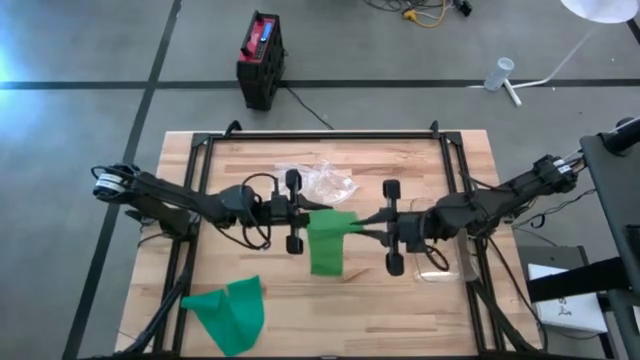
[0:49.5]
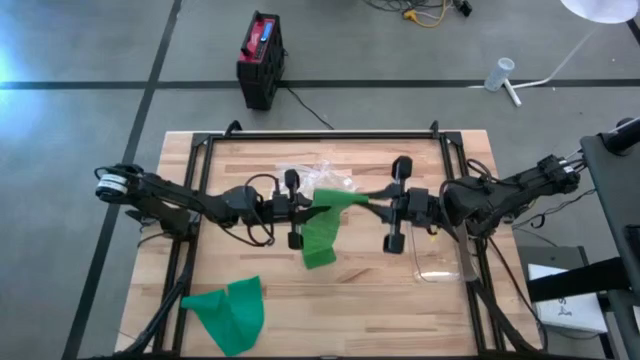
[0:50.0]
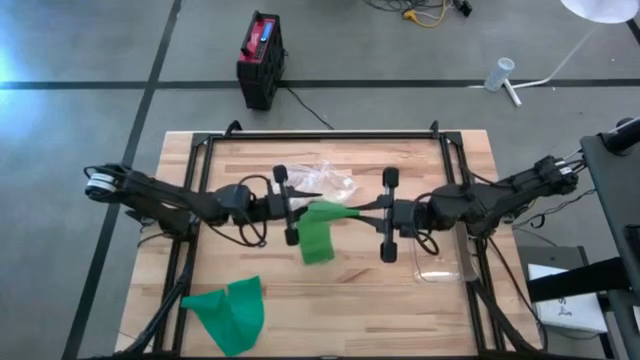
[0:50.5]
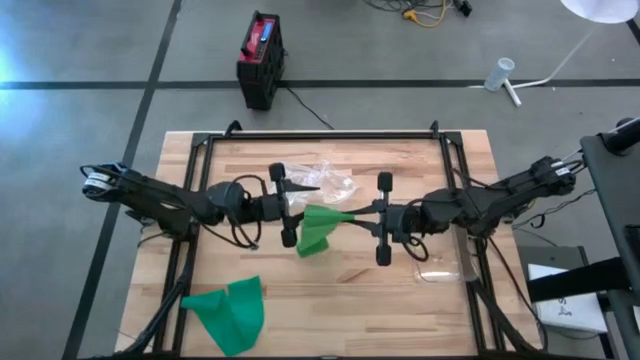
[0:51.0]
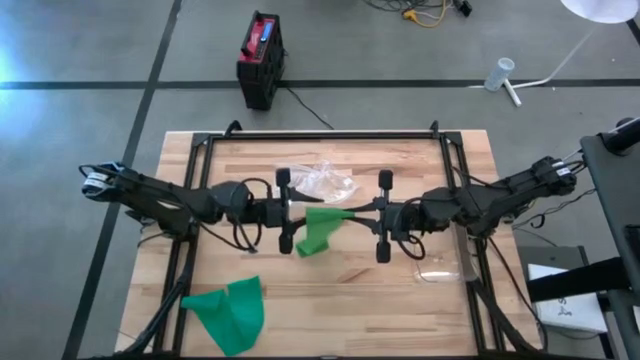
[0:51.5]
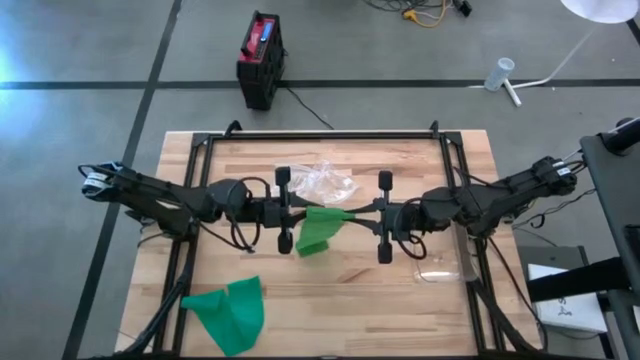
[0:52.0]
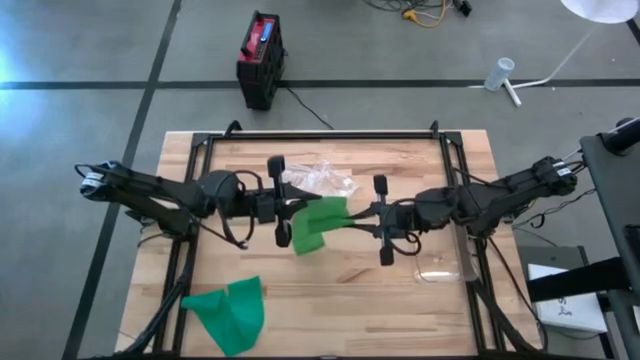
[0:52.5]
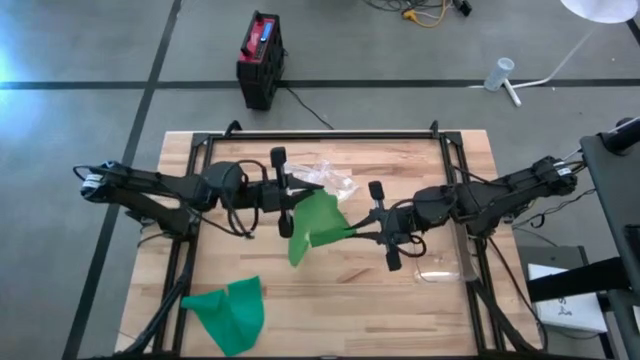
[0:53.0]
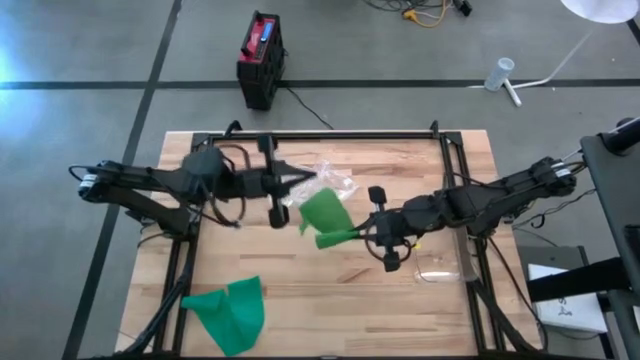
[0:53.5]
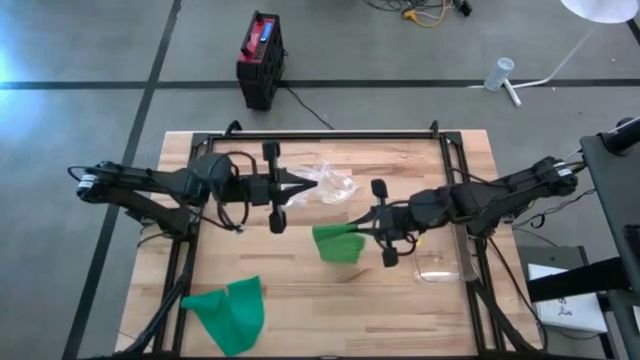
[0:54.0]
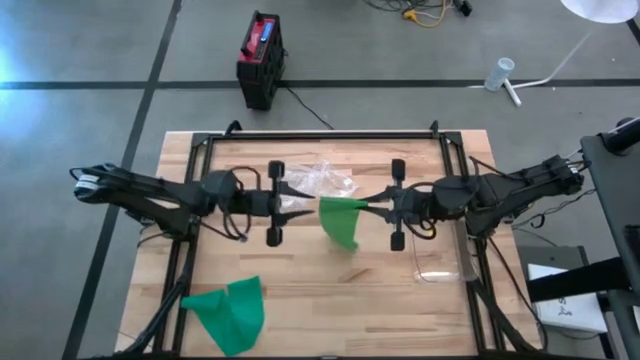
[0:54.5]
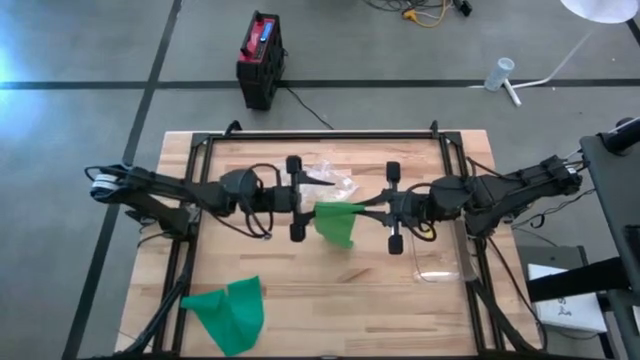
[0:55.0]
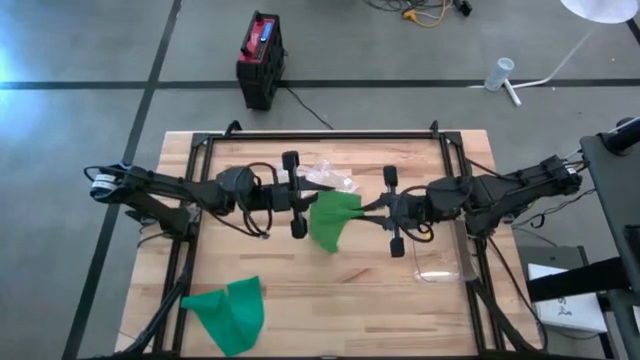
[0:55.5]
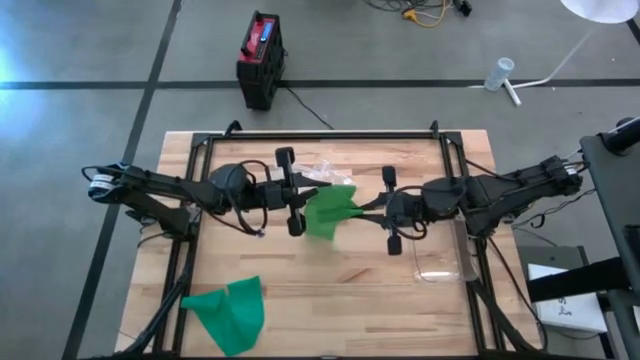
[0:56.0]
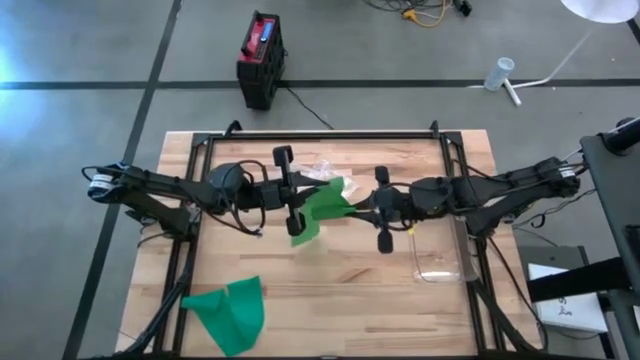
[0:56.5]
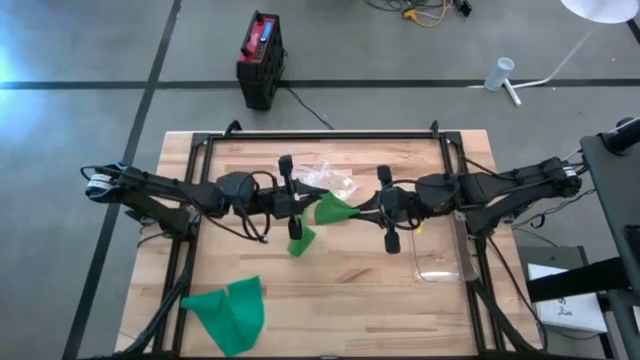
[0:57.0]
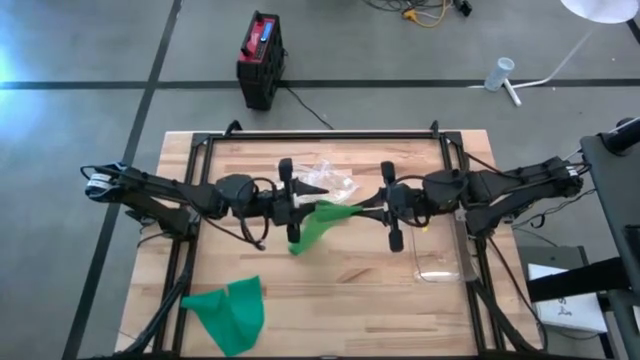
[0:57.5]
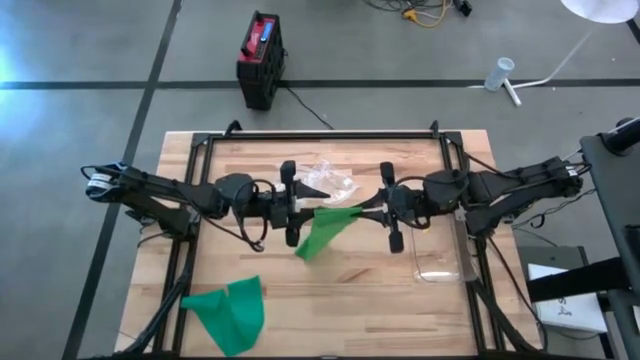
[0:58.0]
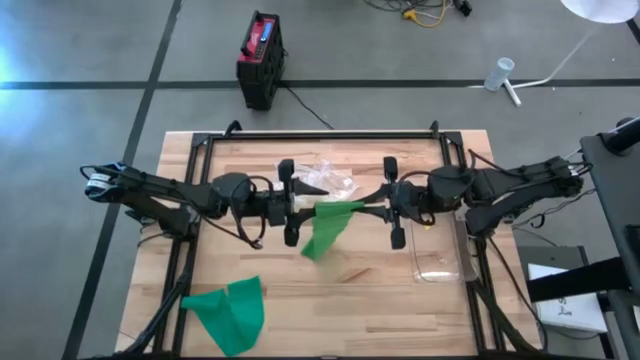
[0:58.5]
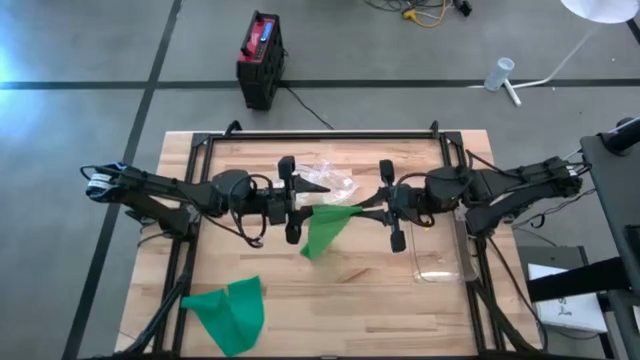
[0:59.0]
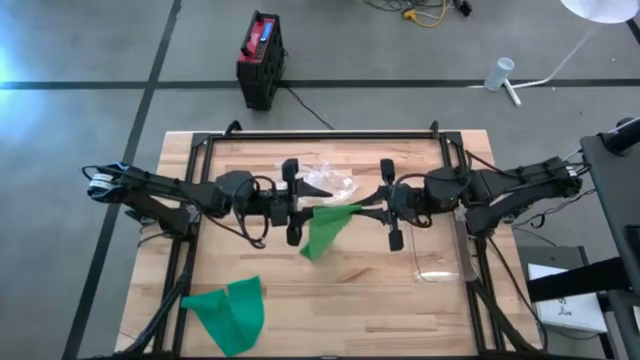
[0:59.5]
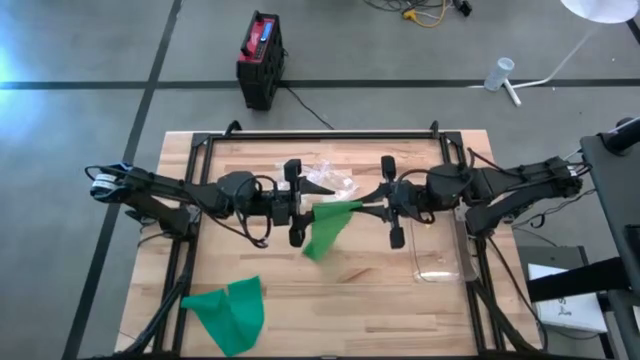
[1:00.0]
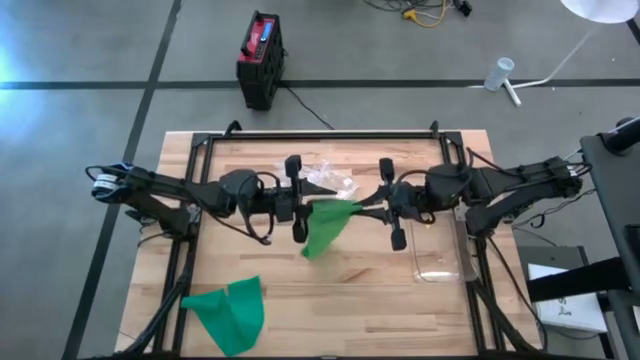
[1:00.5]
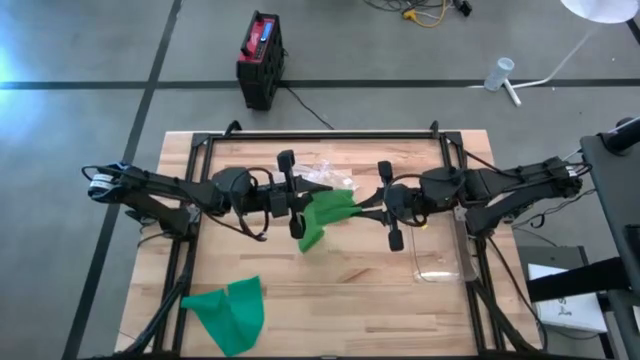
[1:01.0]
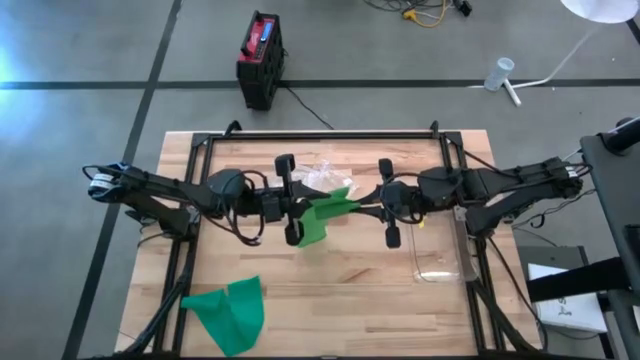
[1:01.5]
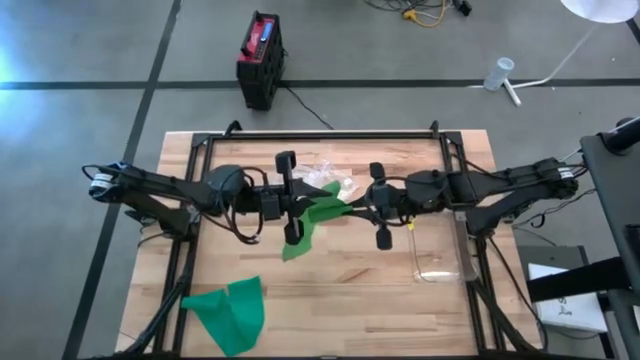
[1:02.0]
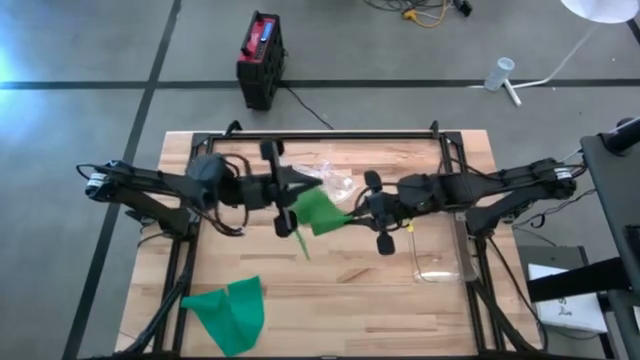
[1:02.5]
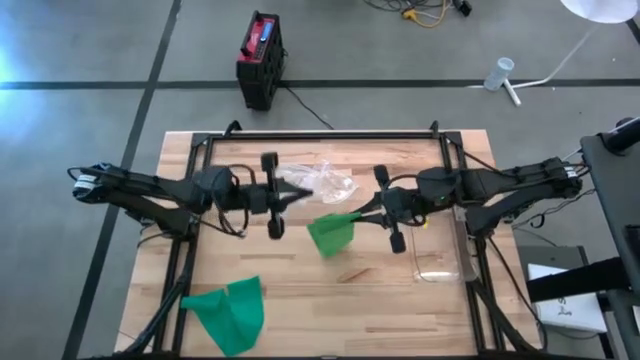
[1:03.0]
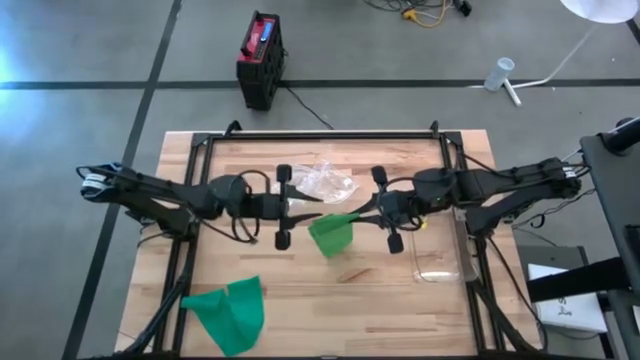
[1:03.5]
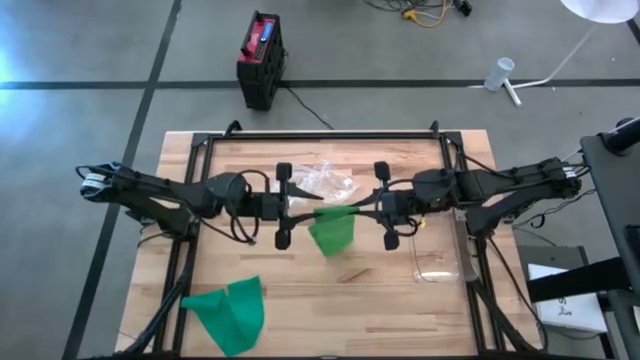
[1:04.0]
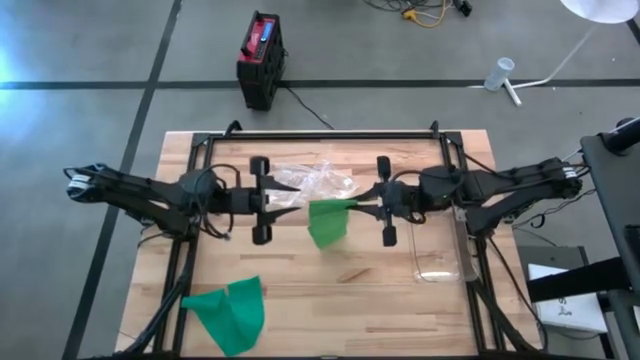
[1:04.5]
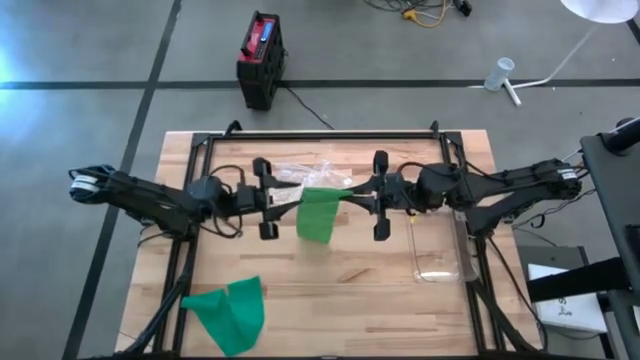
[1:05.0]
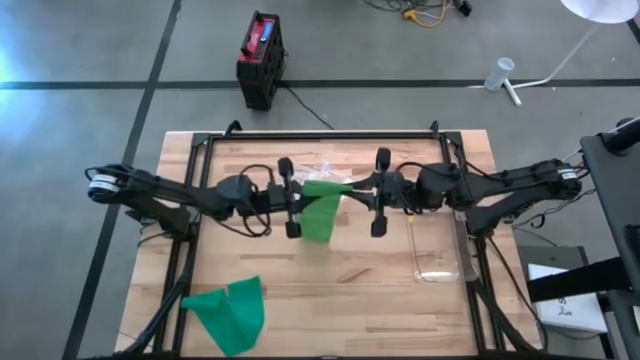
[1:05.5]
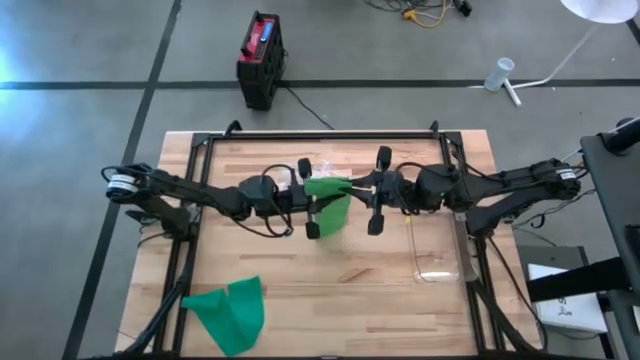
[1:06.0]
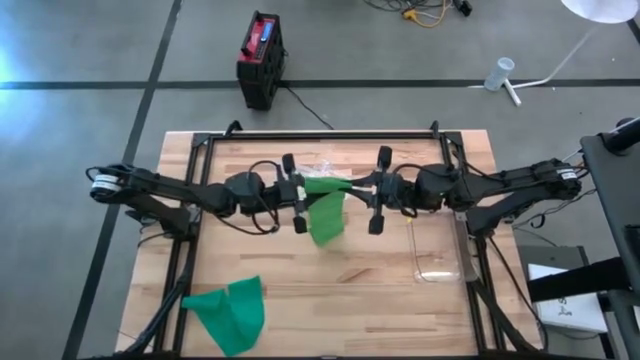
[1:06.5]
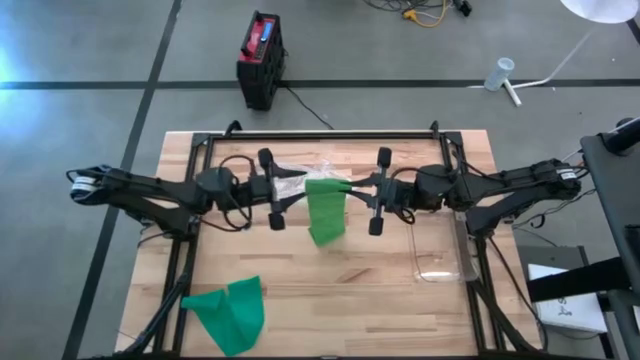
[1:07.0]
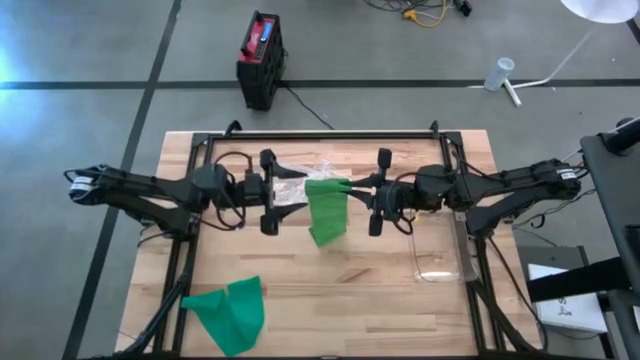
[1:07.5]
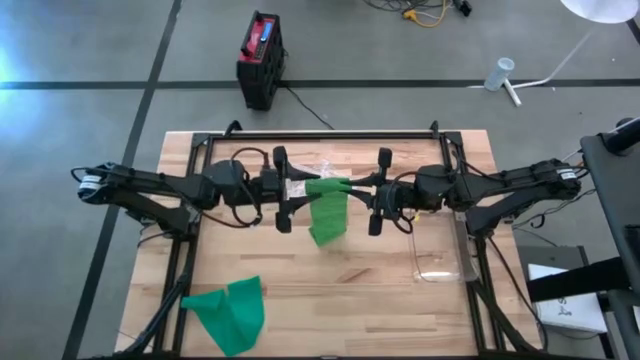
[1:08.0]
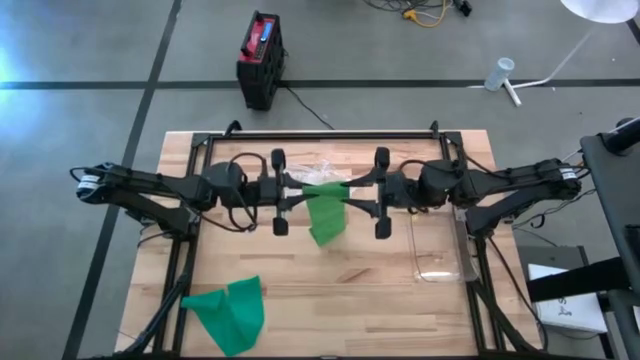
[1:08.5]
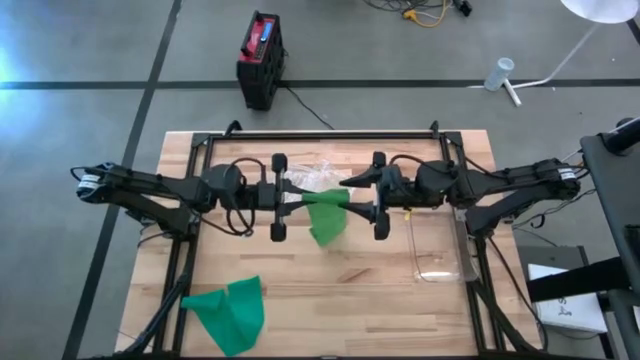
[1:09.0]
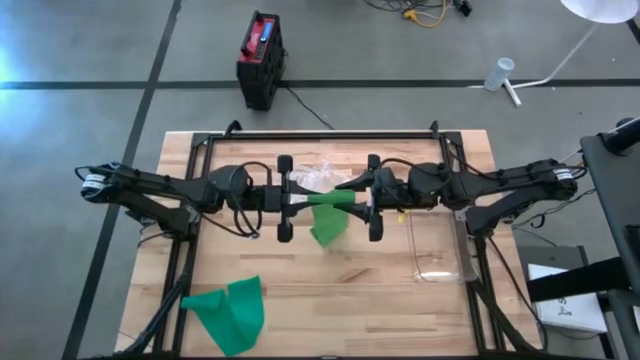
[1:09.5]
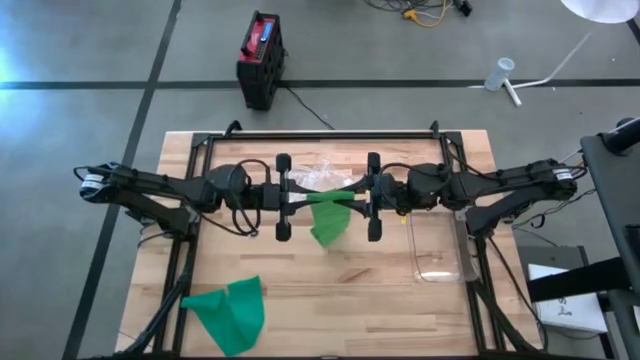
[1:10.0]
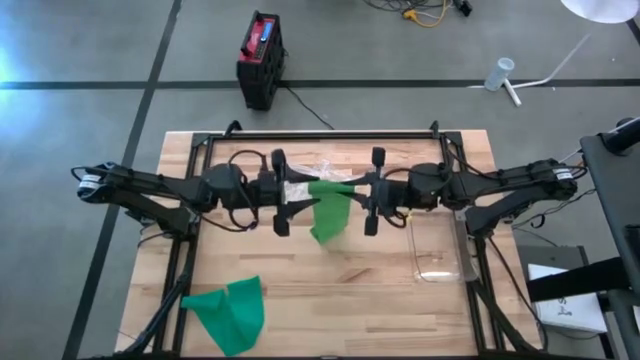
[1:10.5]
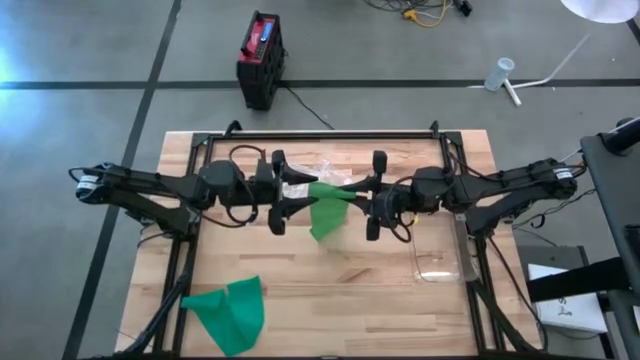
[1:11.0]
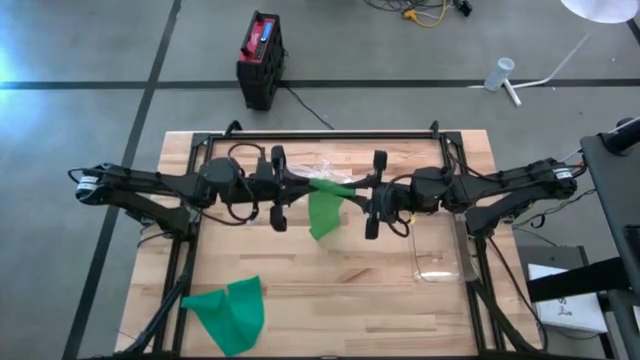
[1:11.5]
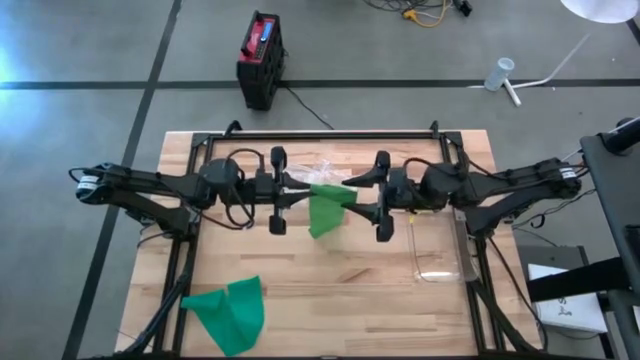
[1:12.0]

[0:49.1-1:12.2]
Task: Roll bandage
Roll the green bandage
